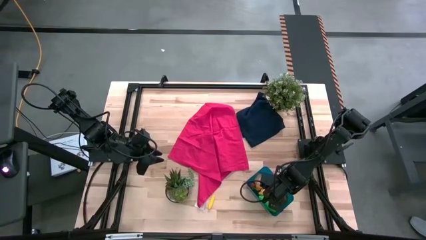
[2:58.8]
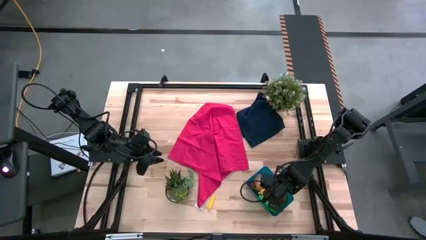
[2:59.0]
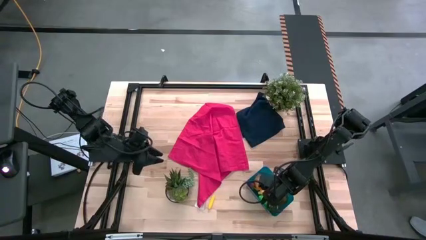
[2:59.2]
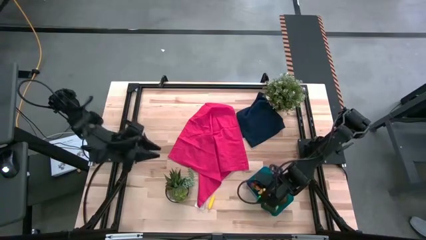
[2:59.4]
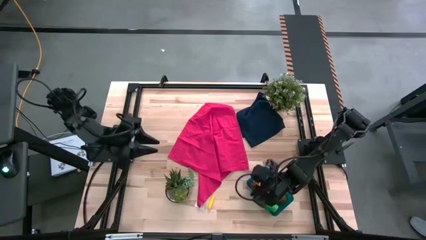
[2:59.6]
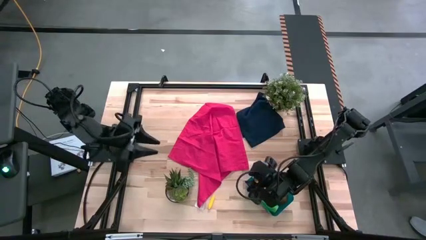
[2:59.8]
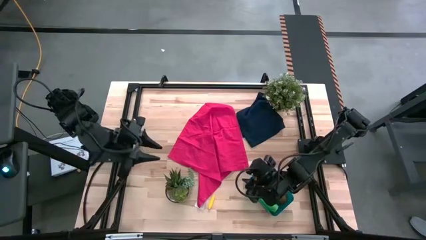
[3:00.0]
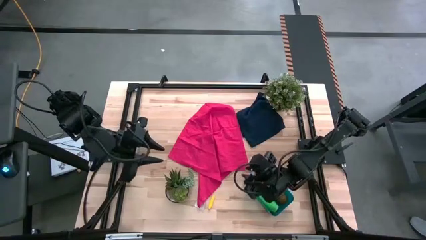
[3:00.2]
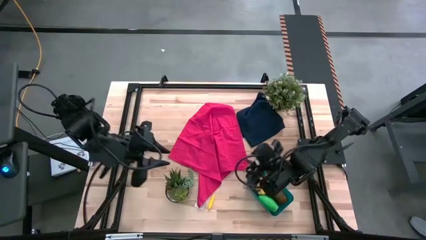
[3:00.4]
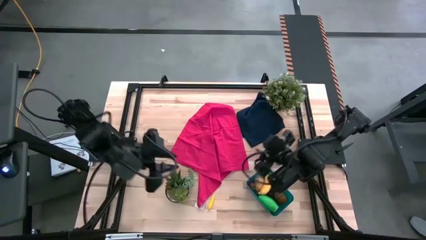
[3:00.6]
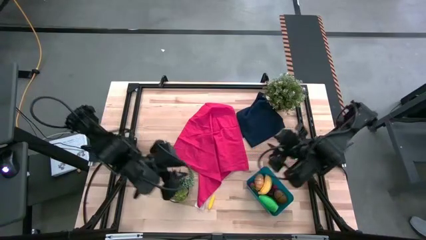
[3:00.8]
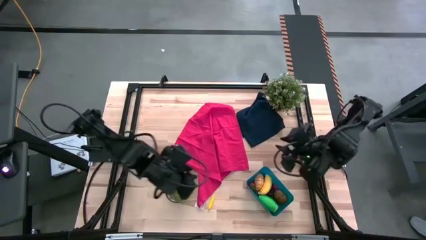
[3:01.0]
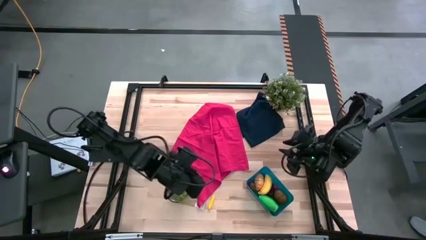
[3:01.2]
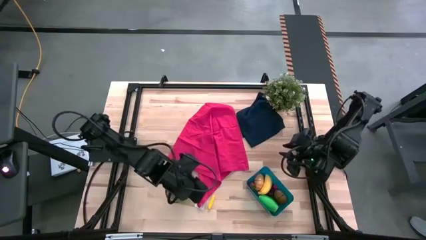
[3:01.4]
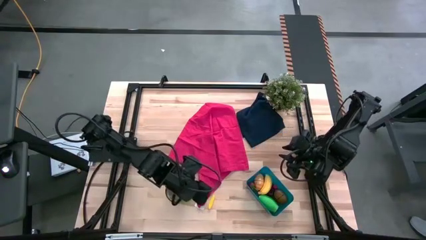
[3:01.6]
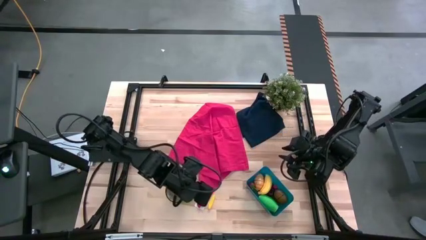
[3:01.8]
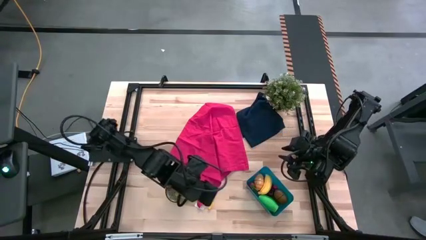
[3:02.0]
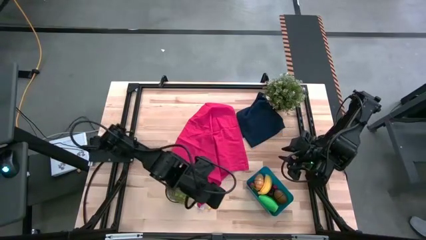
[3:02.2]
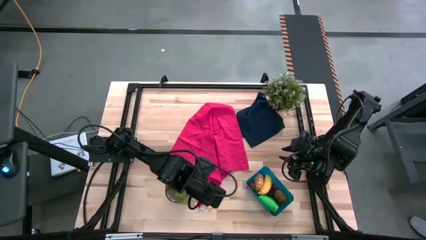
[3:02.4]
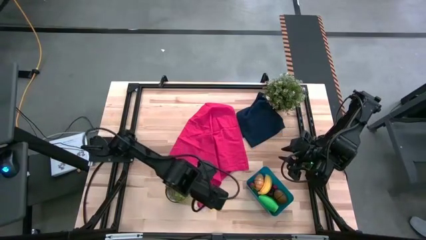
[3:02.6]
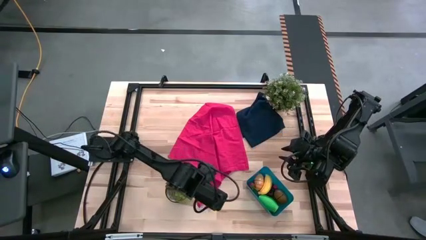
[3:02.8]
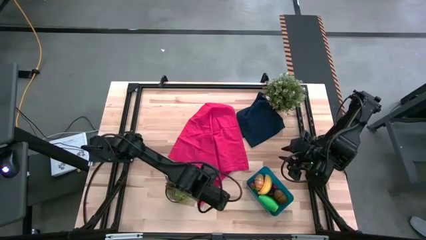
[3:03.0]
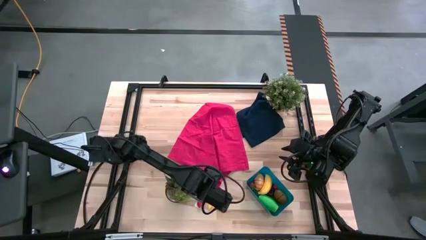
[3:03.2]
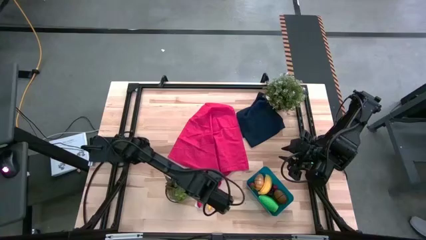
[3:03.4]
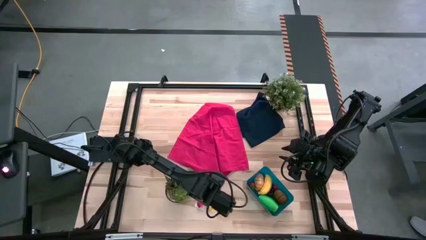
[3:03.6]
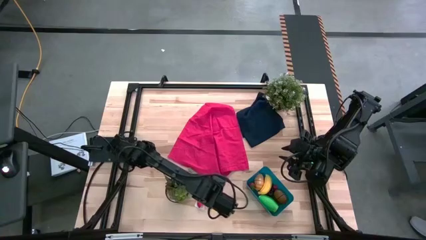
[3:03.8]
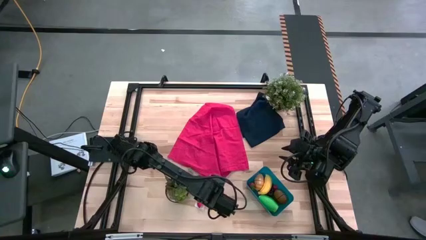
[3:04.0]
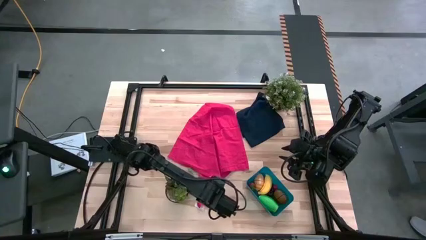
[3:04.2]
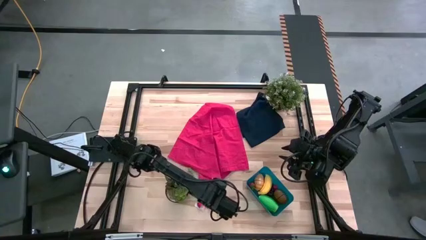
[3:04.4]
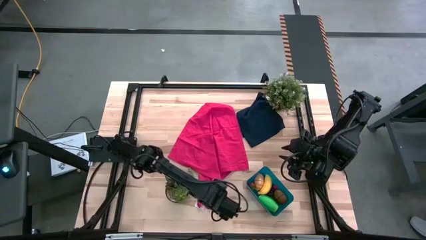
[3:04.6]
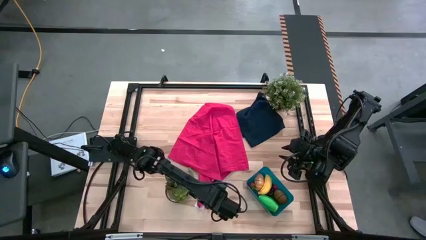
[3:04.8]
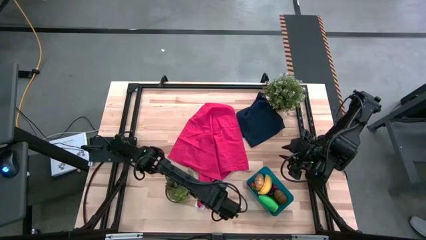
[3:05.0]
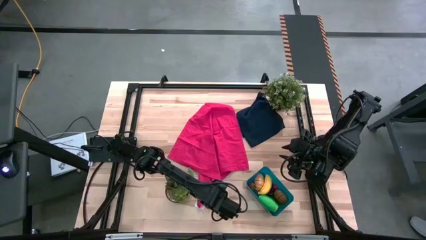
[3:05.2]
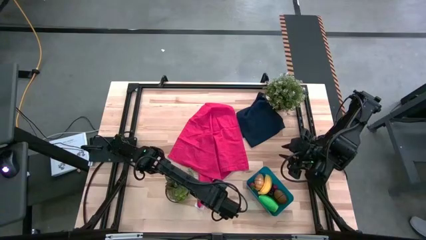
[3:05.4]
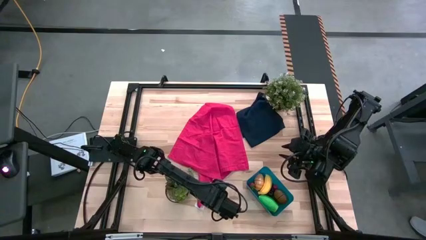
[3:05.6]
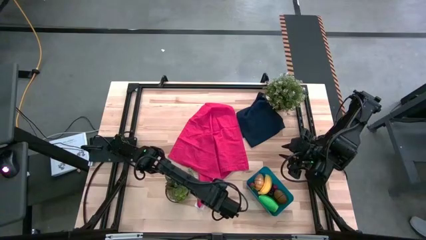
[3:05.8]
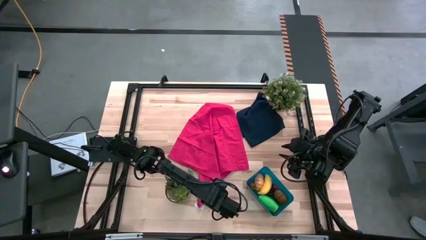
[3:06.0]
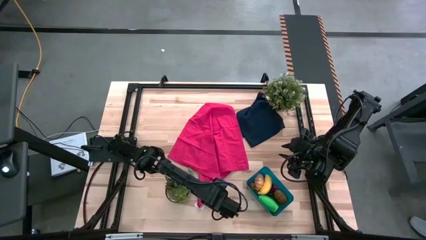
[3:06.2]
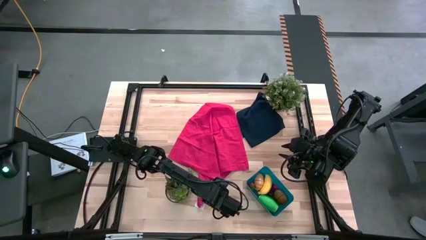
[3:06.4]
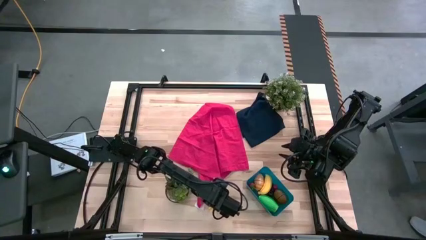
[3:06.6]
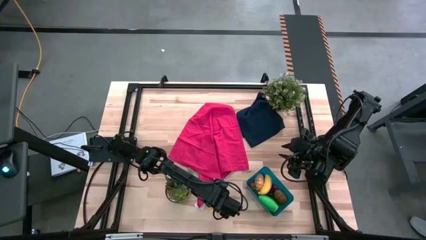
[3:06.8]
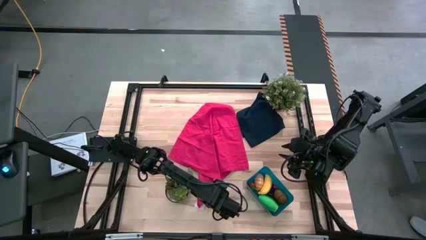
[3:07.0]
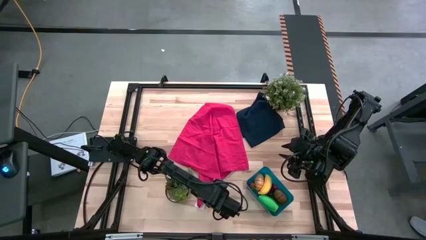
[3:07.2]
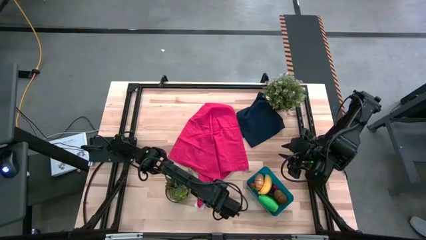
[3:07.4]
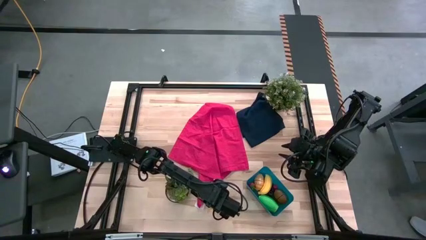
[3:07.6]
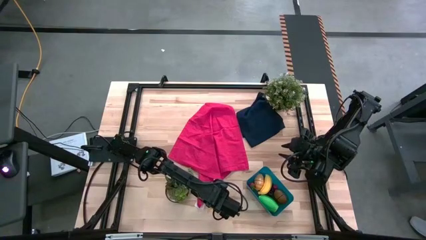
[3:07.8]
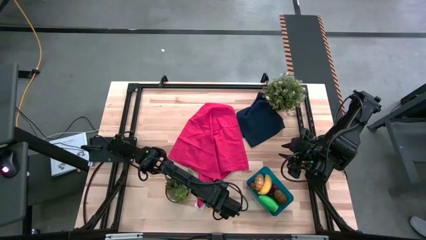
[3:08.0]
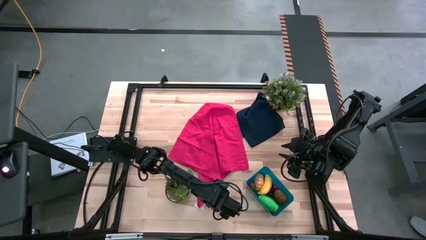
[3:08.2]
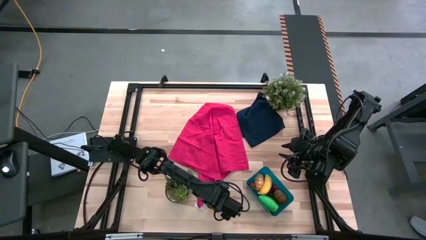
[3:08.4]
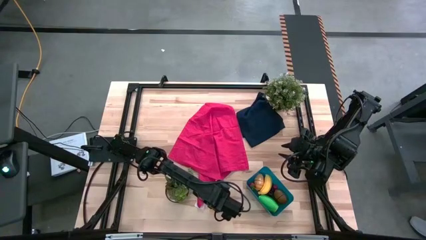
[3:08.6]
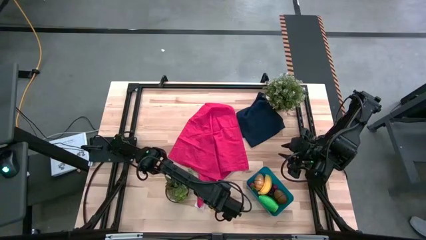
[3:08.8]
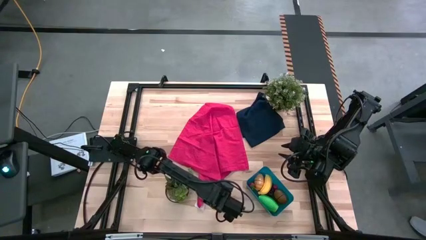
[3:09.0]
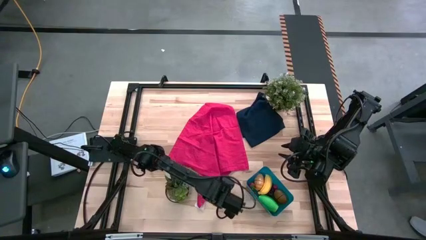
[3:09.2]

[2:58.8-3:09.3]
Task: Pick and placing Produce into tupperware
Put the yellow corn into the blue bin
